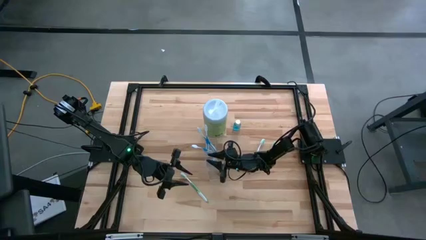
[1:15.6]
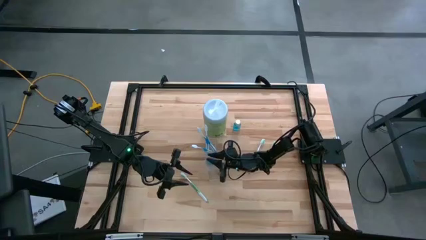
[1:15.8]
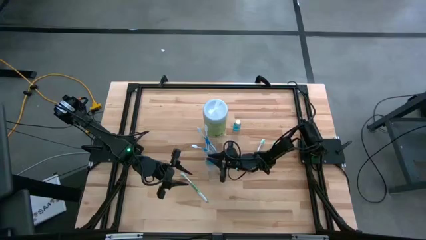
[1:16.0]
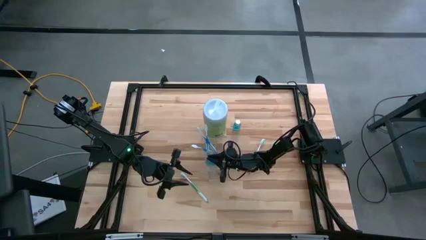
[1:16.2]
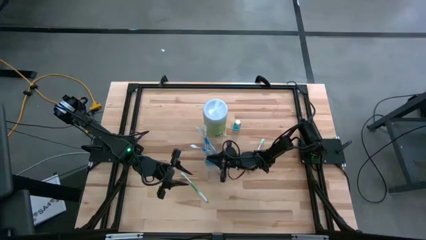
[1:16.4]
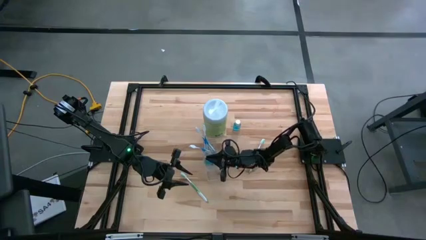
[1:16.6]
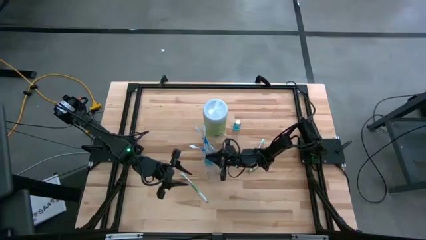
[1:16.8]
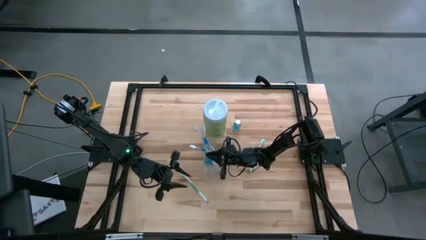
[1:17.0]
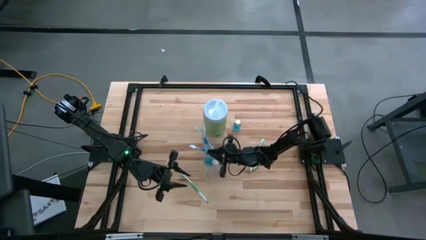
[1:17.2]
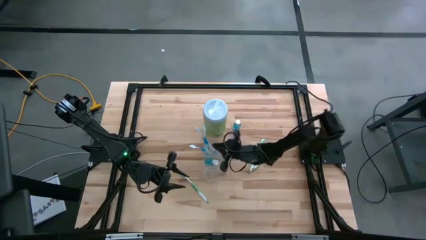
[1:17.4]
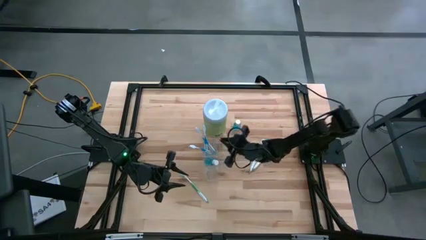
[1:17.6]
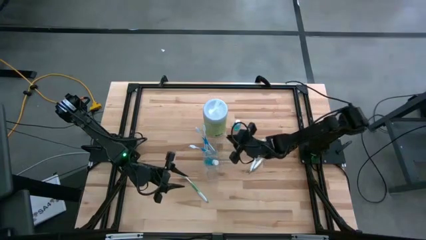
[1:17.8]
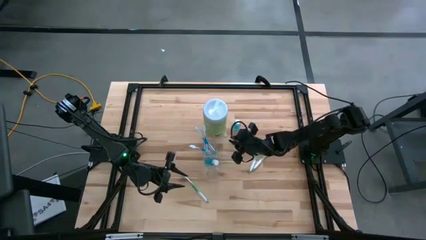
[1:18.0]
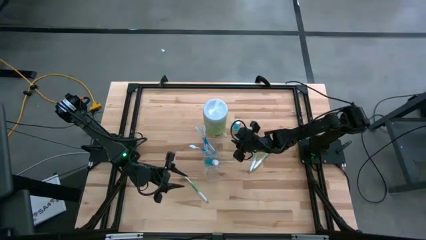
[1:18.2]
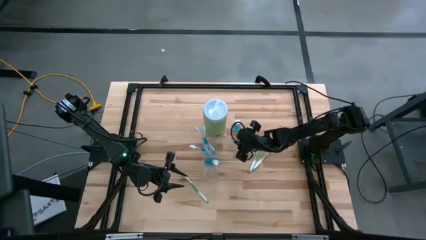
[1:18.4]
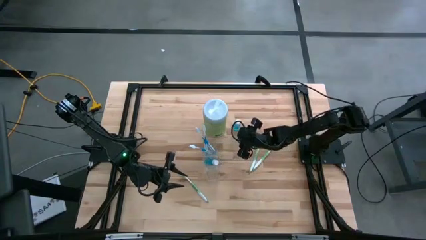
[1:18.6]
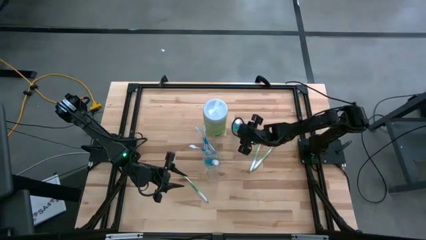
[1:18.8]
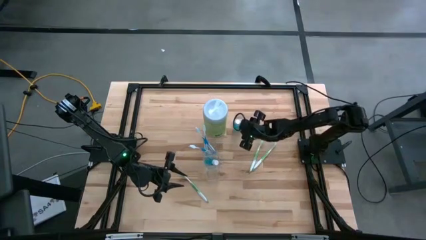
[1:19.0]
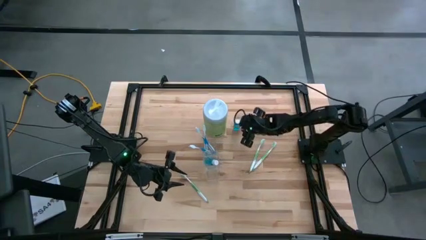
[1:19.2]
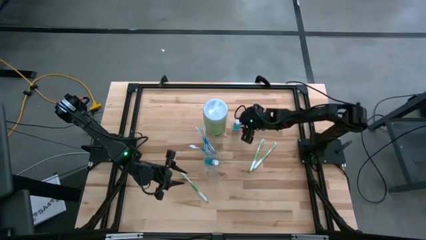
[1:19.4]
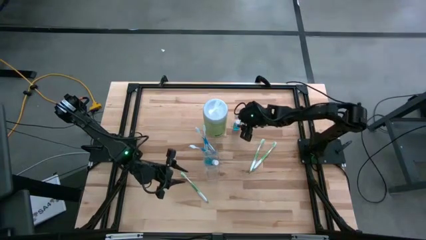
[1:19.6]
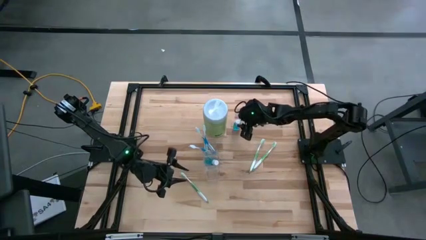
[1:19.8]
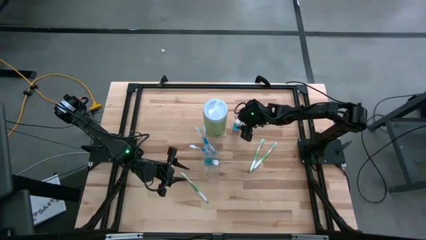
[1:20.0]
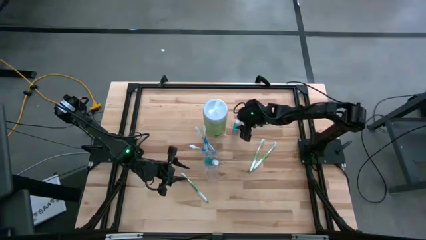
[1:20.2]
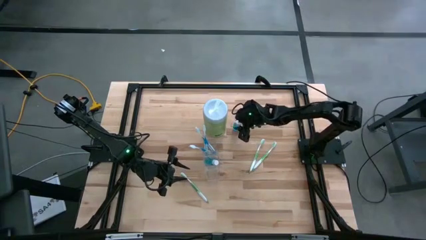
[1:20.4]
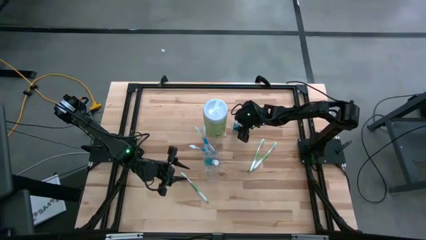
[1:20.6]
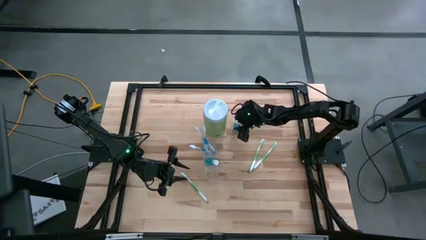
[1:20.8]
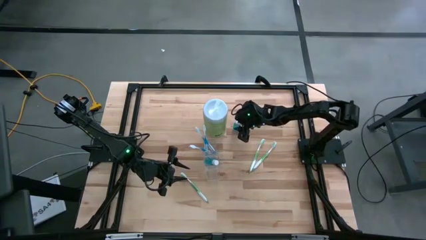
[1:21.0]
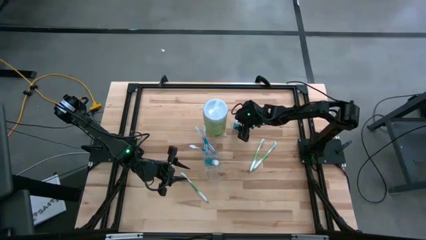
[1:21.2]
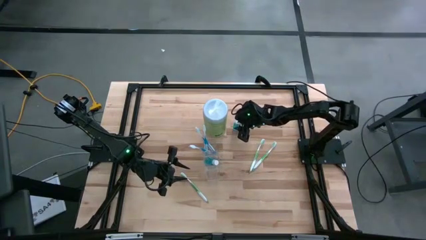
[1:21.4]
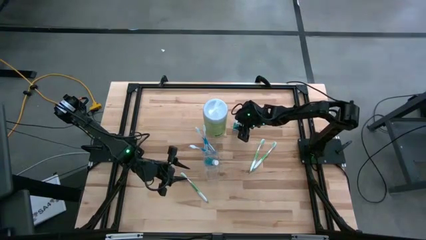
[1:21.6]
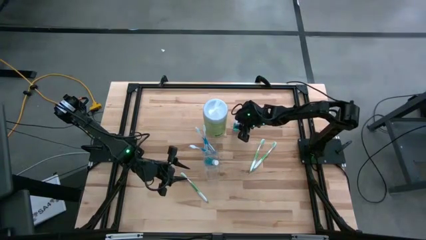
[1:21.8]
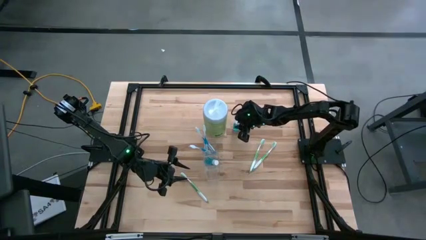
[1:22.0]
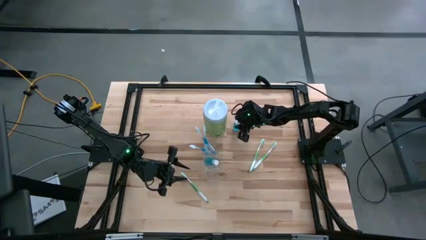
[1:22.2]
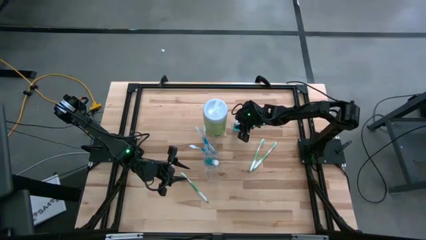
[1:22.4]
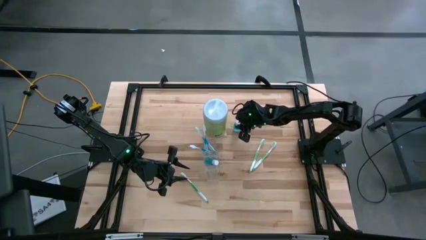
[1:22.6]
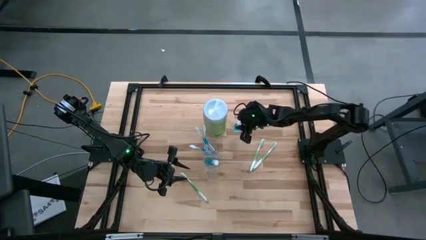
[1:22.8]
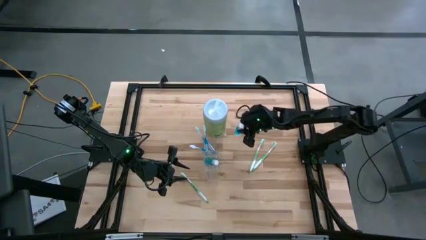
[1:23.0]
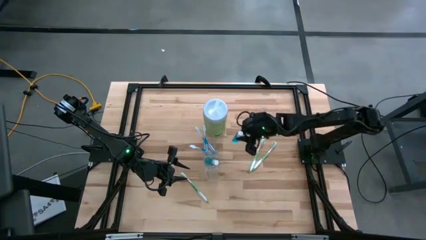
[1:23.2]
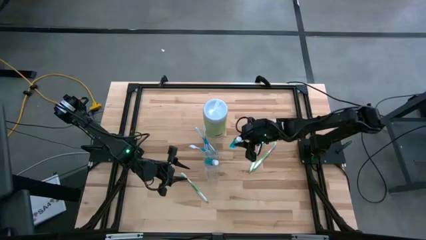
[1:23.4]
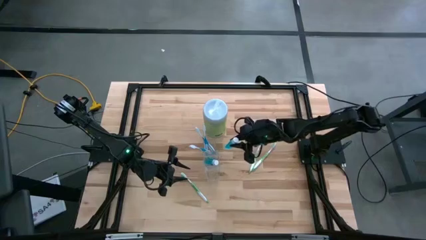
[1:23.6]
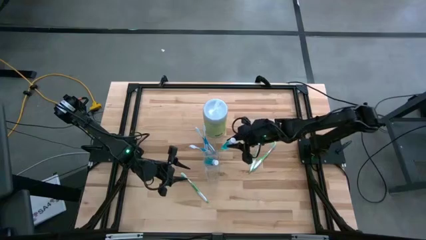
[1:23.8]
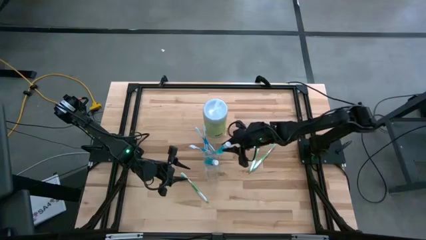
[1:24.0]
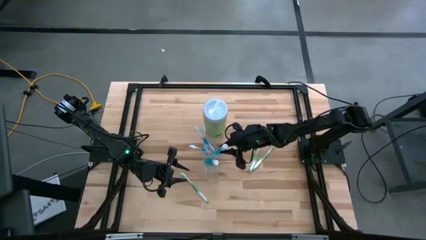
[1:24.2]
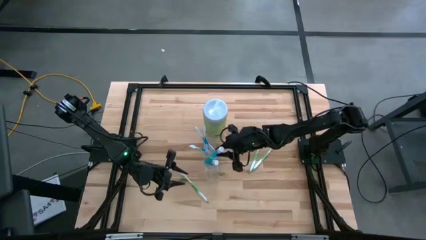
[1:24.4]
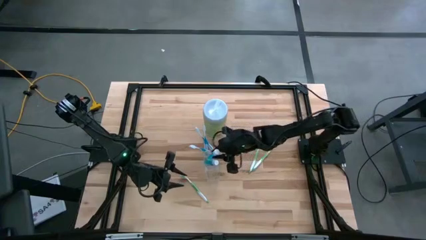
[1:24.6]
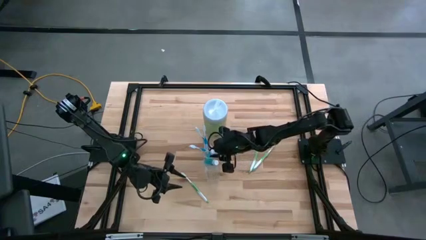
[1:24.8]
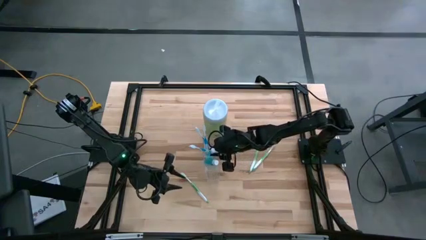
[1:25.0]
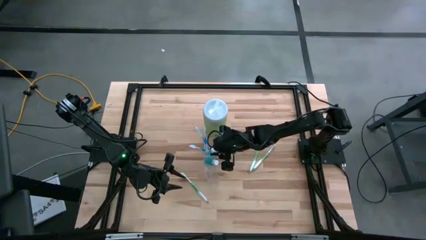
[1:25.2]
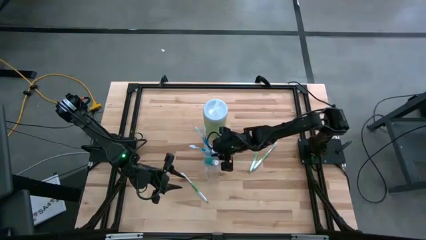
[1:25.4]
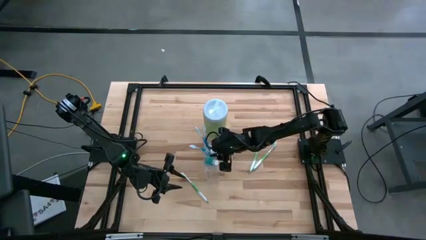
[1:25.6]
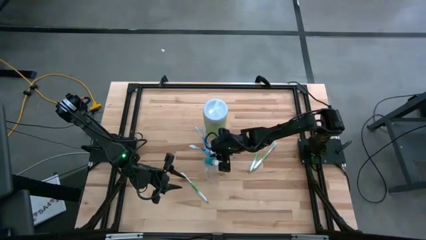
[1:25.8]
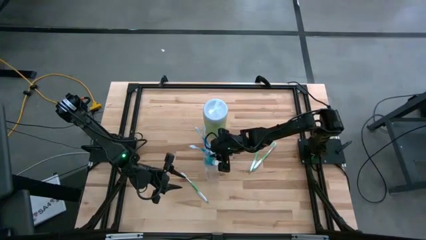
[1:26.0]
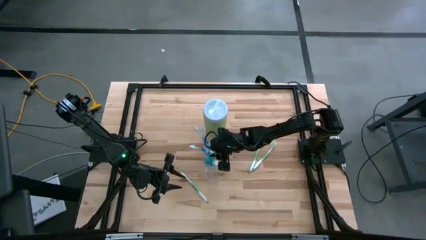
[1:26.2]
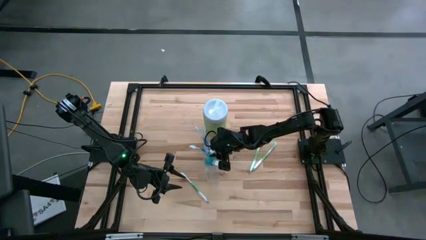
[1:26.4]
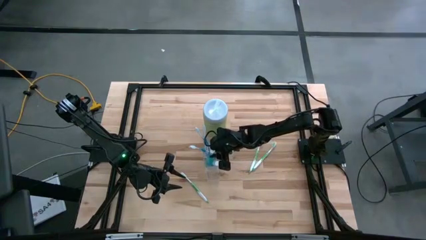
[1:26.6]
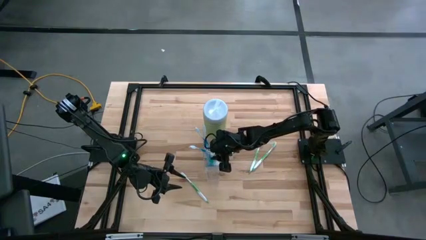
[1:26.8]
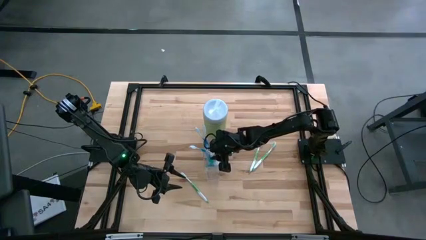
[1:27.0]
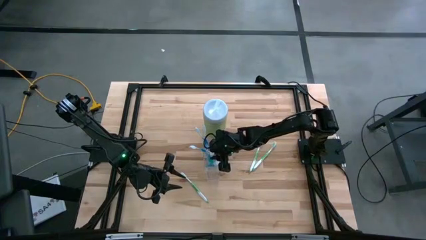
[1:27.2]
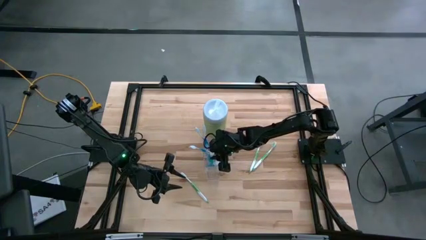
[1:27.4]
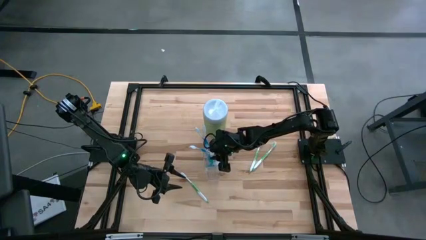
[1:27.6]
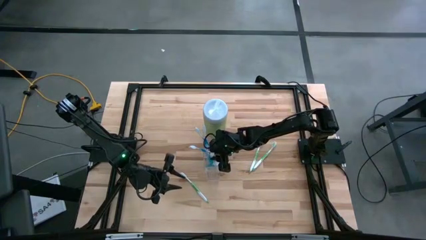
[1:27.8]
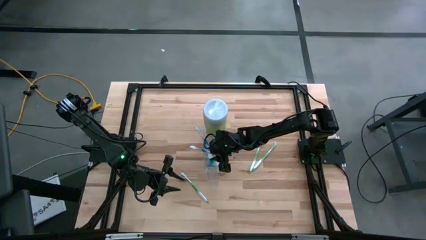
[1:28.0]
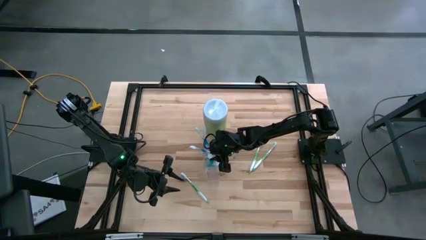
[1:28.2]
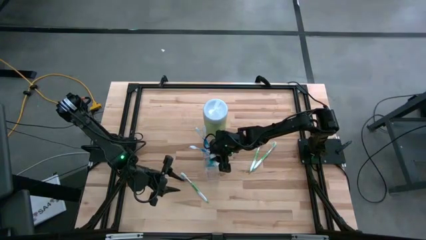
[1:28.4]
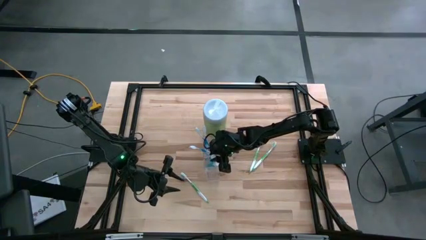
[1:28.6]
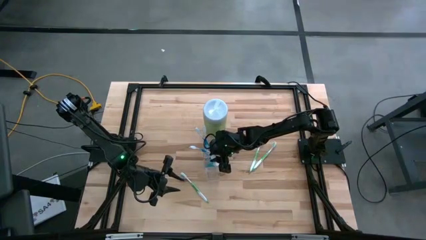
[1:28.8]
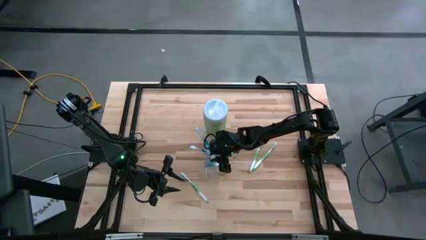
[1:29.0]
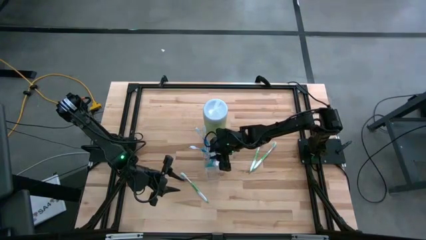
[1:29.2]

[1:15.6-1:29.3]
Task: Pick & Place toothbrushing station
Put the mouthwash into the transparent organizer
